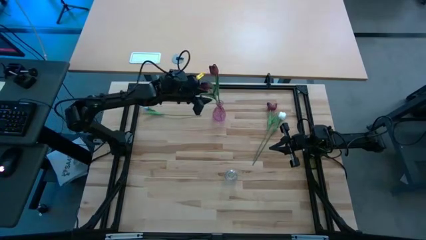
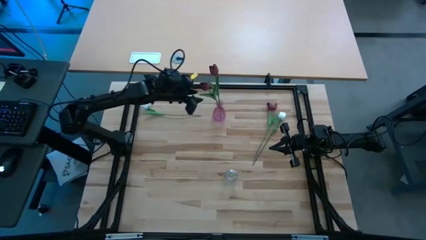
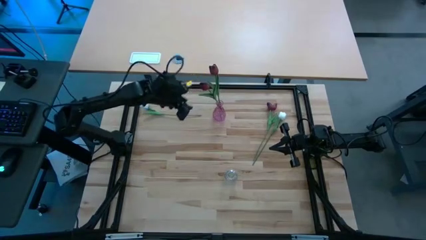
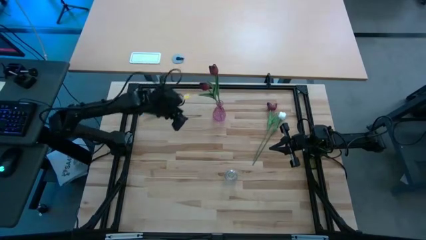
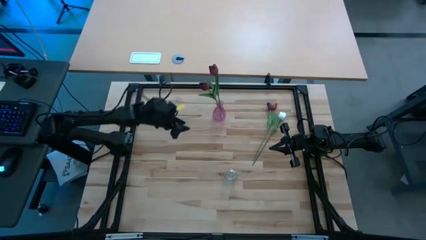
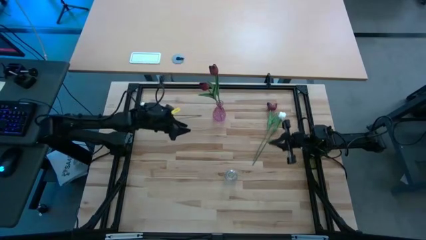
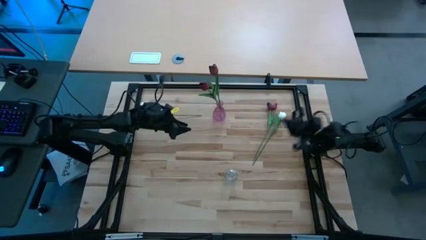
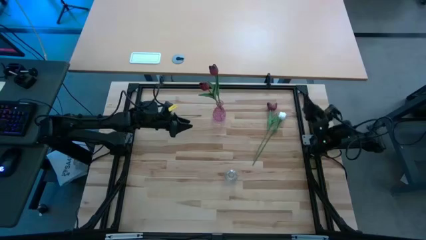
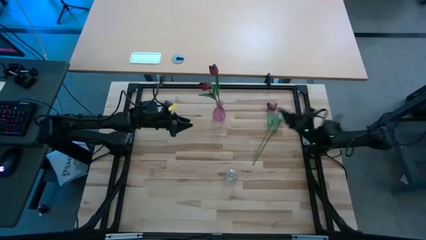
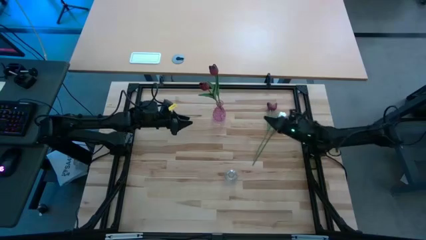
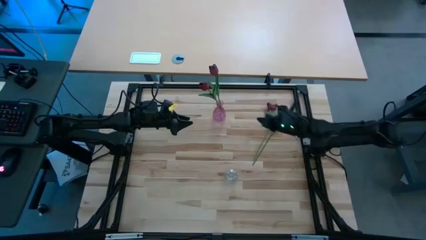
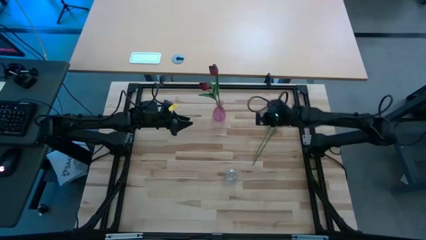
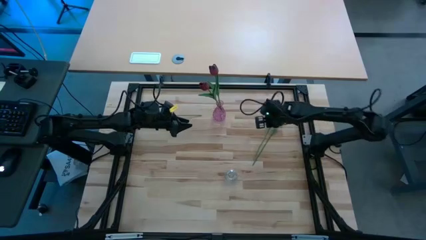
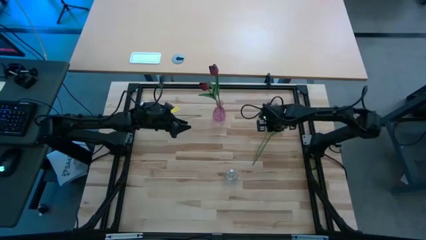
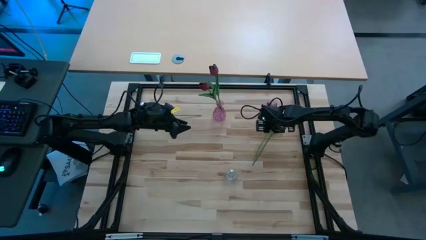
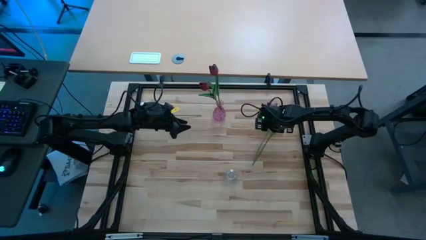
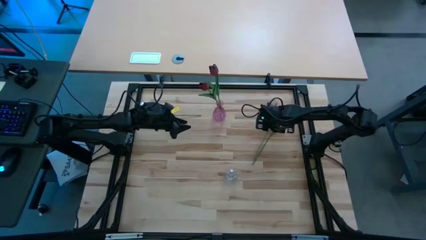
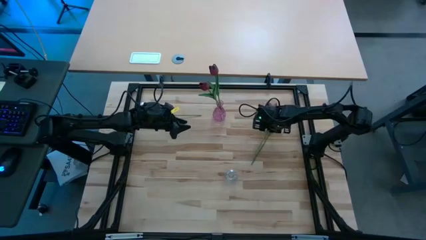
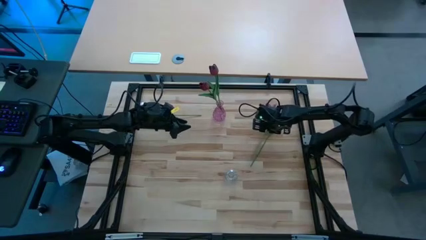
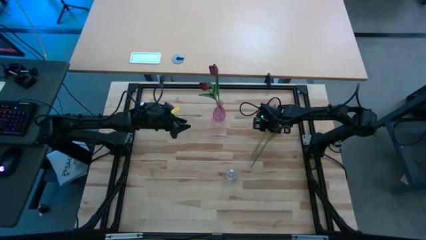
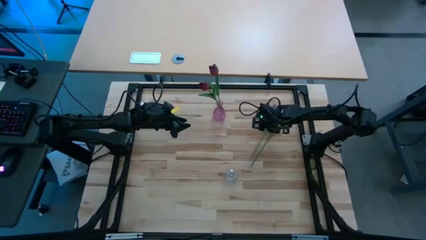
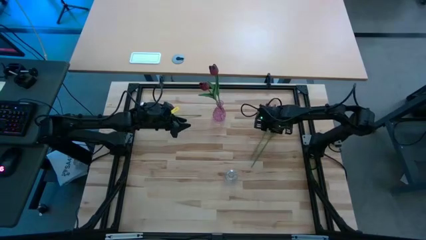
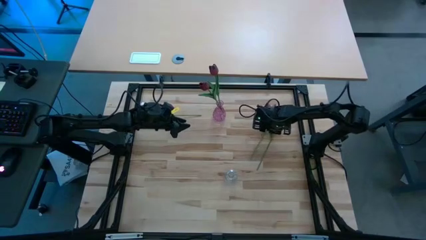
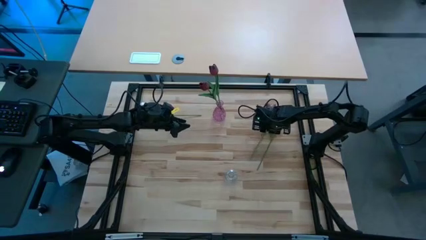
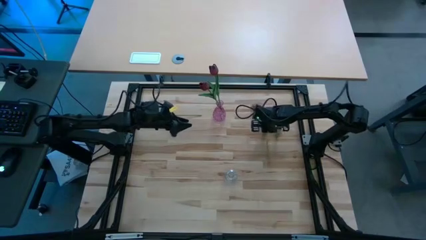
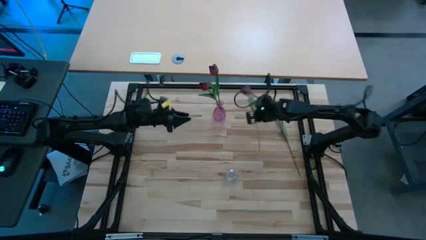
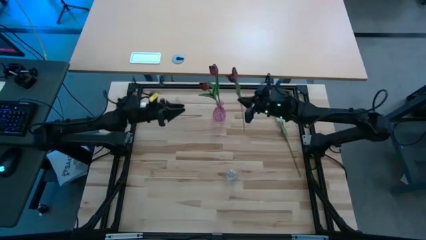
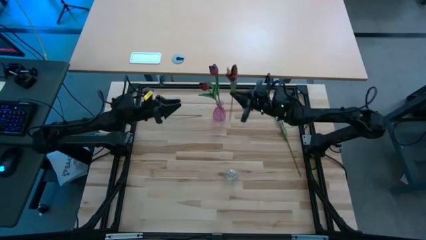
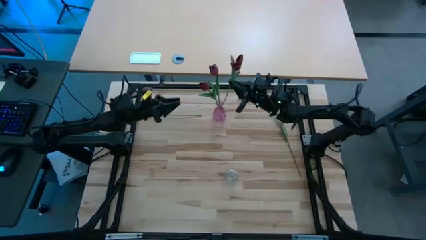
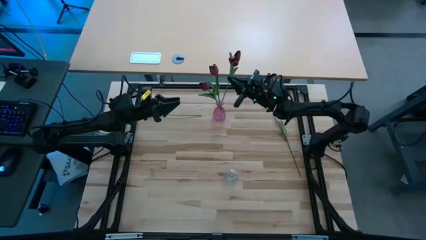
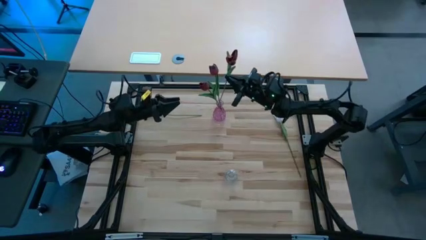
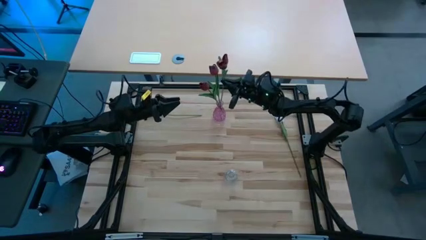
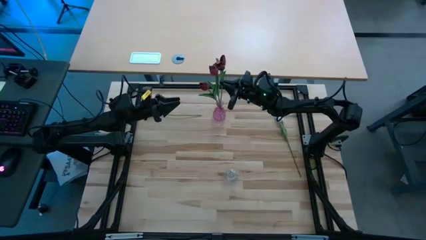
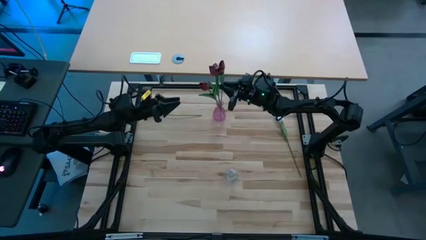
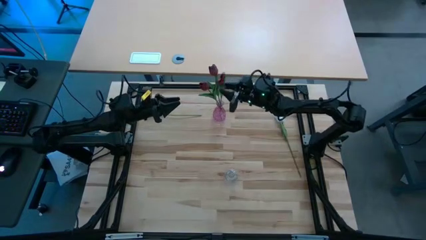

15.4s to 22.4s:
Task: Sort flowers into vase by color
Put the red flower into the pink vase

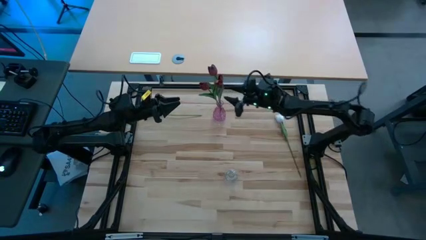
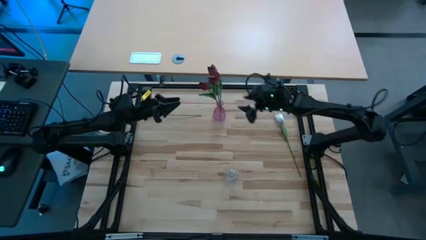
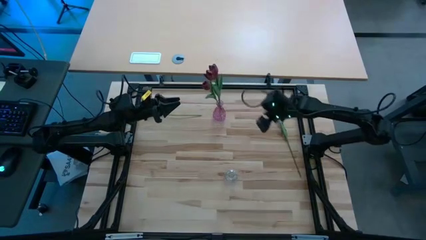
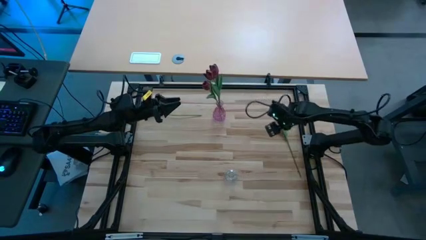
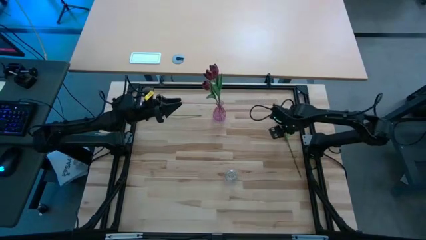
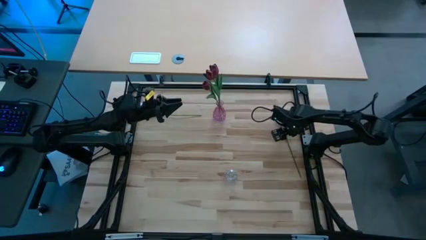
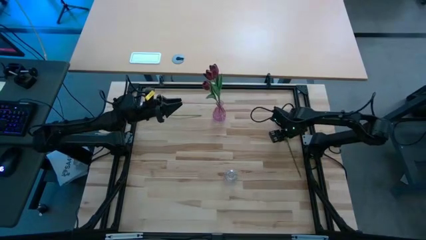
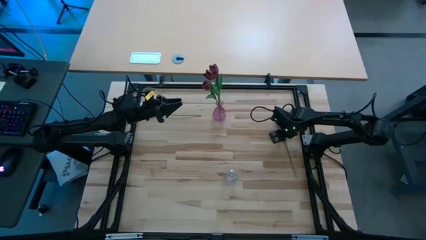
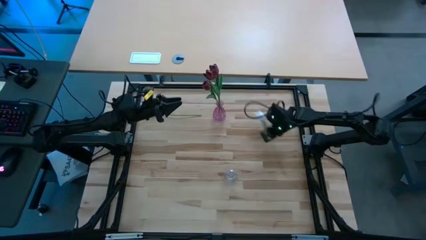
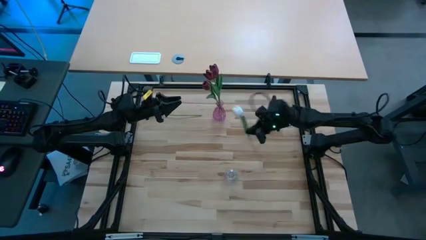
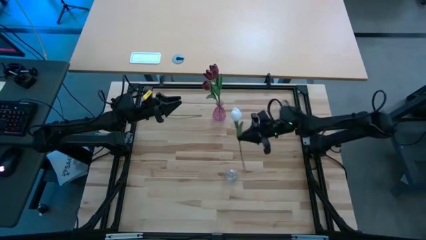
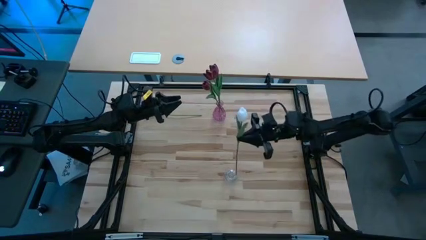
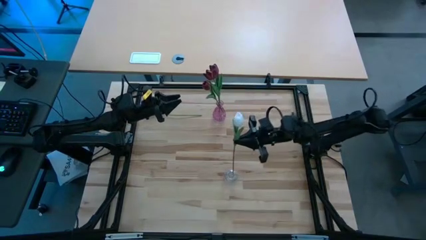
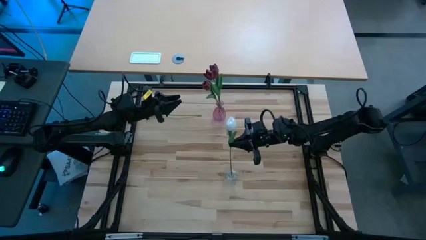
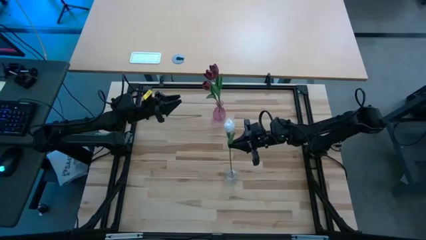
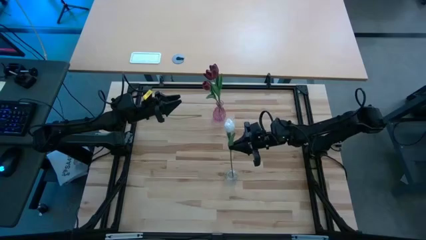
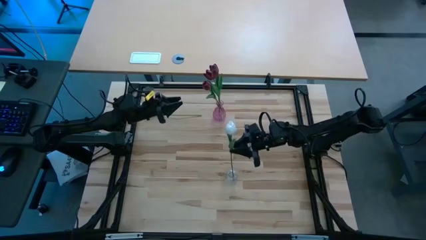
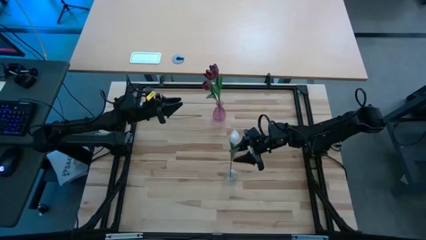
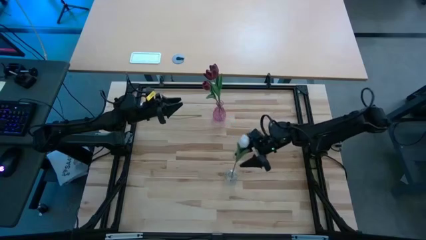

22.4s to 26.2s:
Put the right white flower into the transparent vase

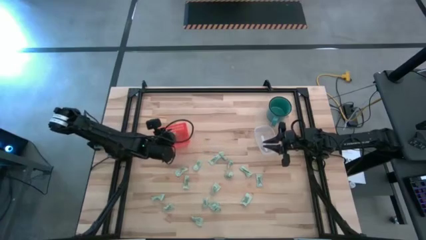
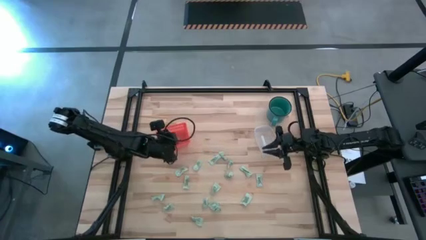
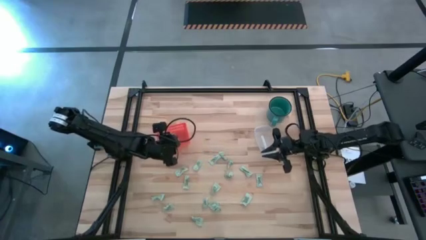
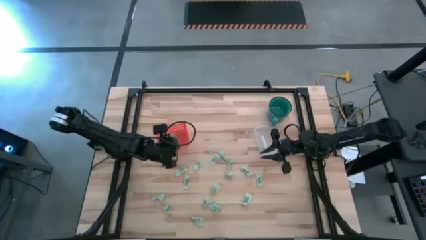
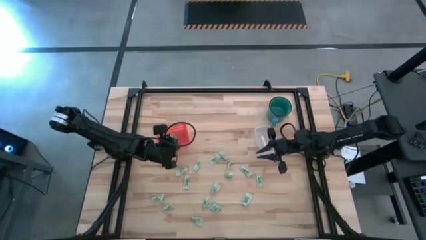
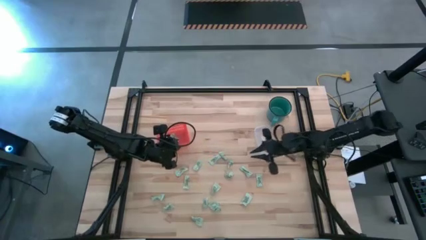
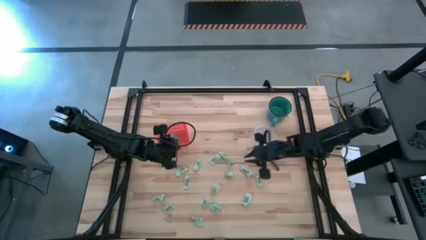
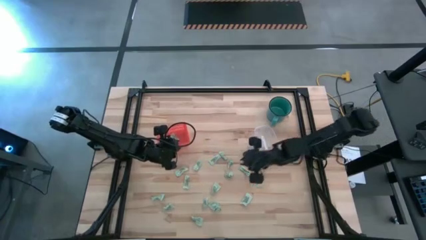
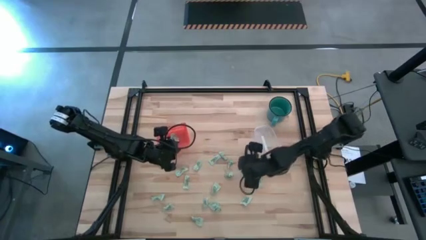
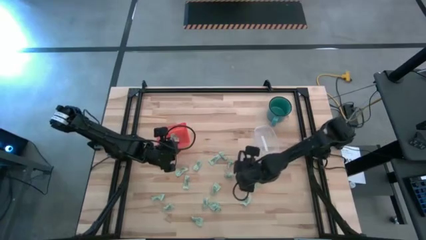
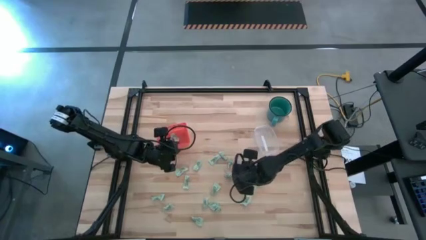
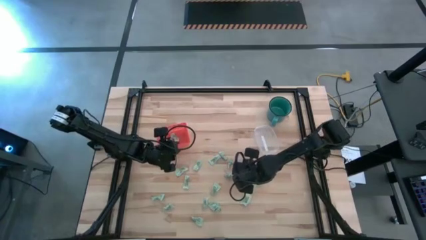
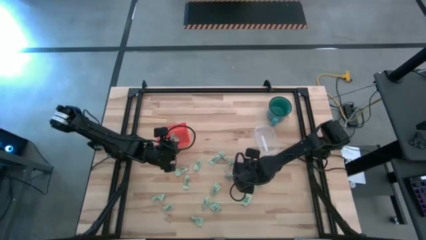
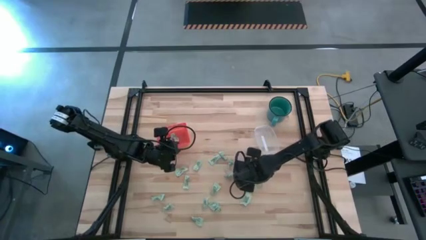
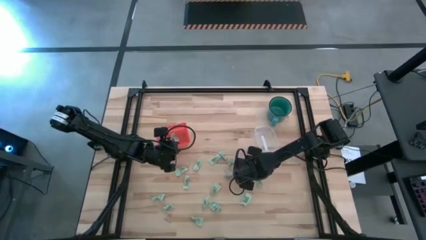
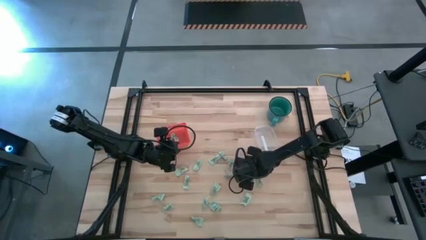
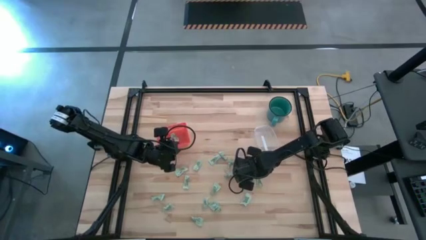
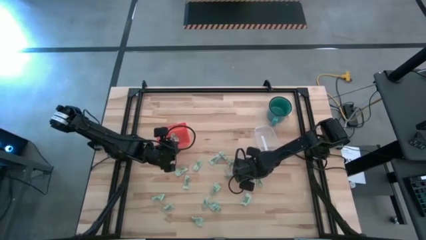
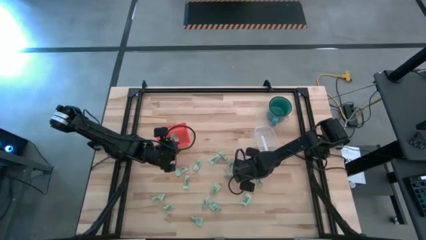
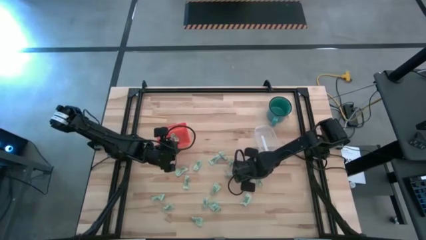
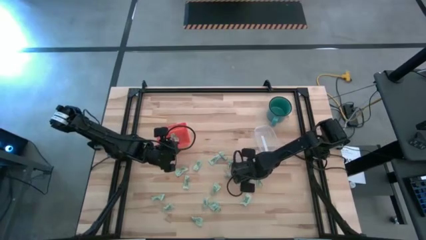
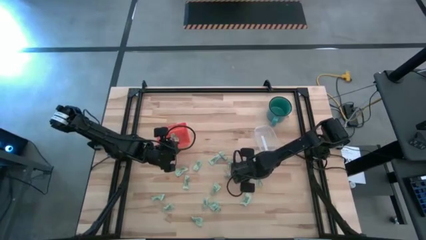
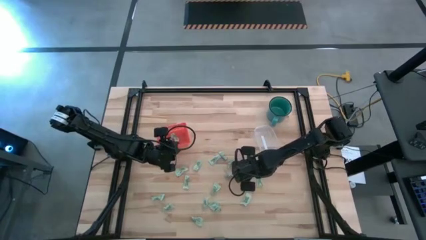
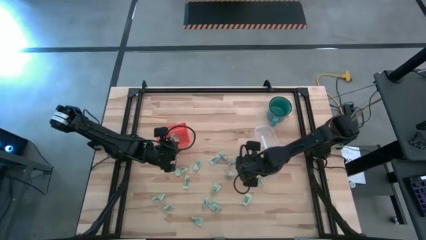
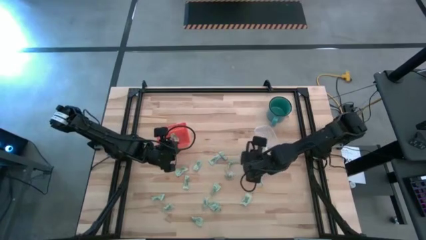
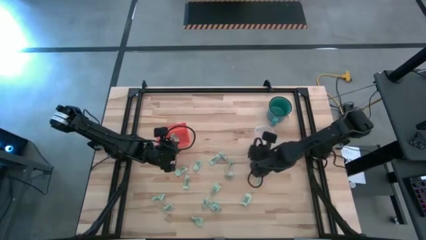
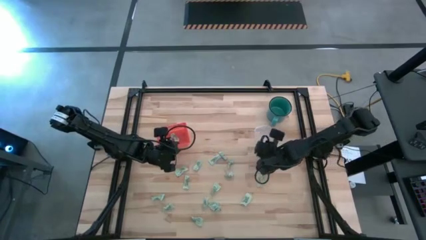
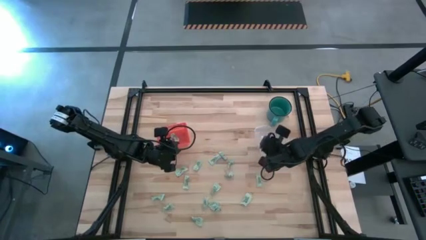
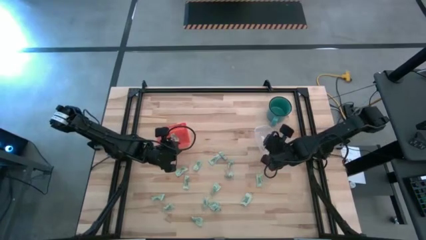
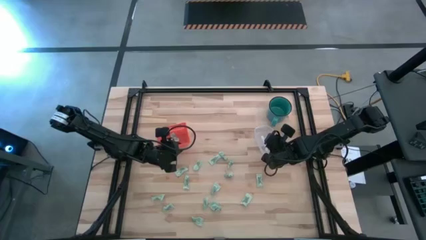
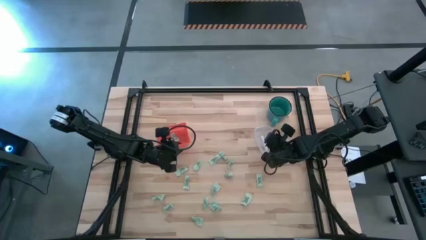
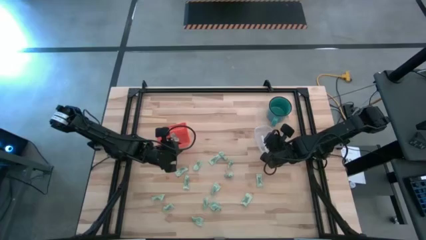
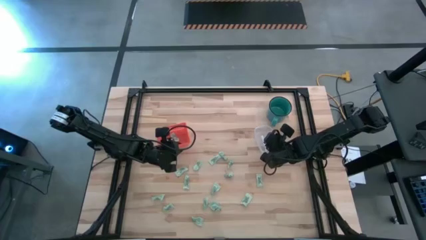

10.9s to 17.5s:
Task: Pick and place items into bin
Put the stevia packet into the transparent container
